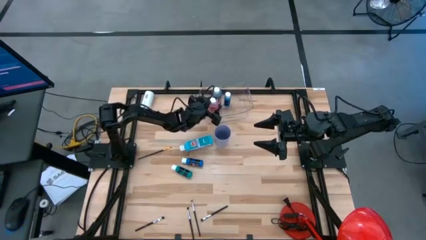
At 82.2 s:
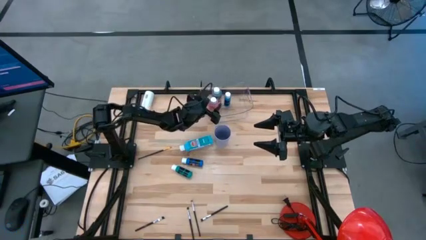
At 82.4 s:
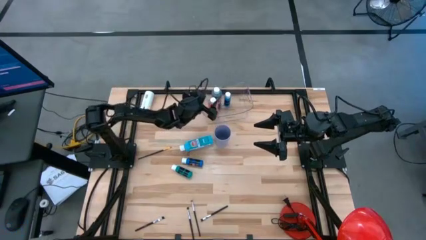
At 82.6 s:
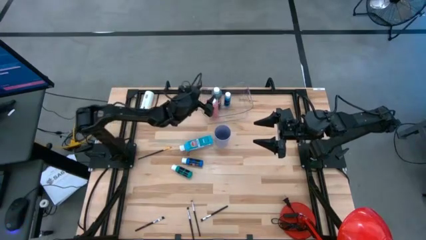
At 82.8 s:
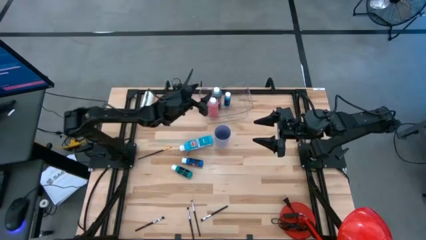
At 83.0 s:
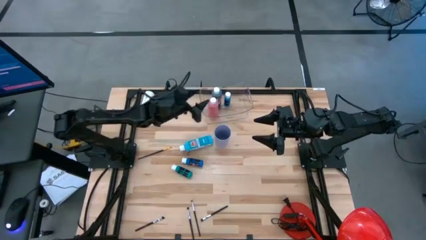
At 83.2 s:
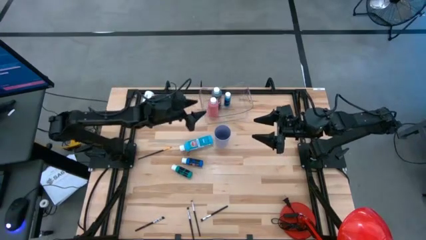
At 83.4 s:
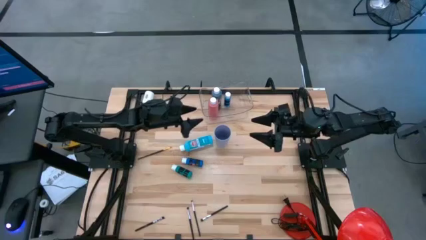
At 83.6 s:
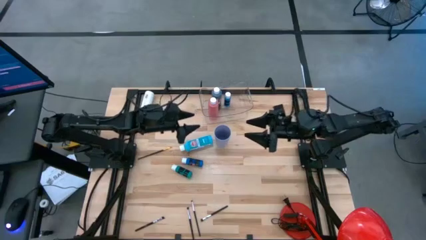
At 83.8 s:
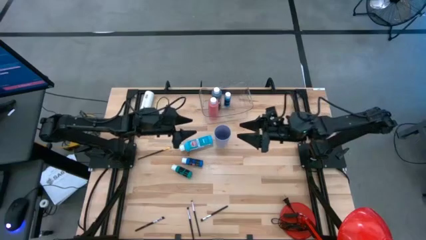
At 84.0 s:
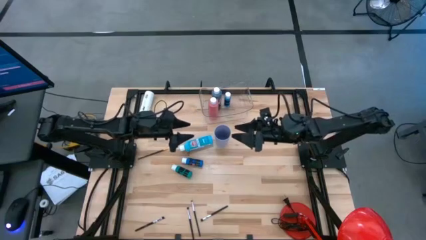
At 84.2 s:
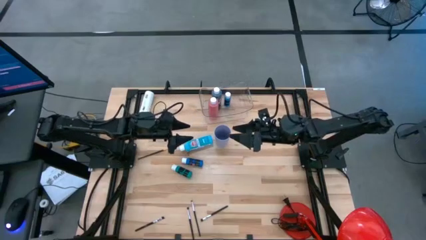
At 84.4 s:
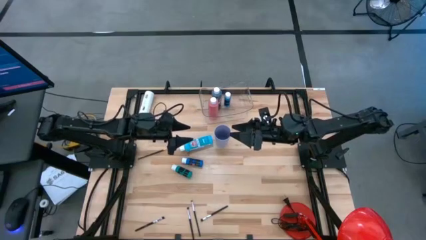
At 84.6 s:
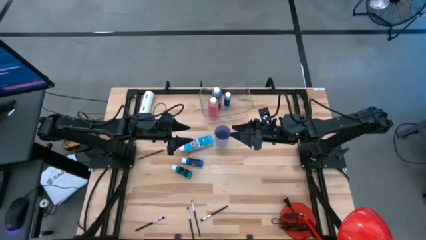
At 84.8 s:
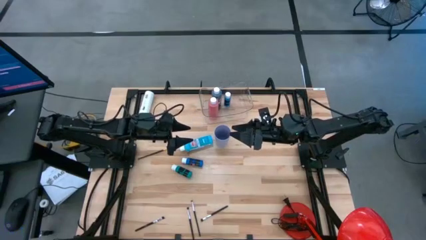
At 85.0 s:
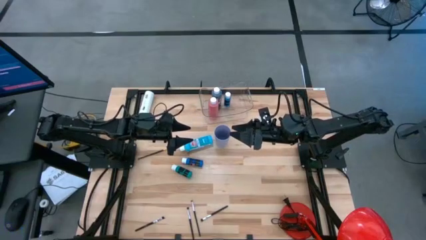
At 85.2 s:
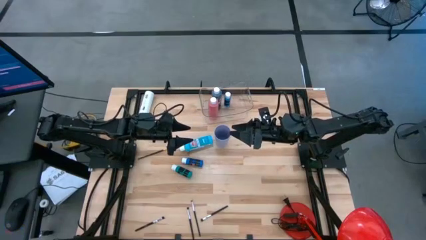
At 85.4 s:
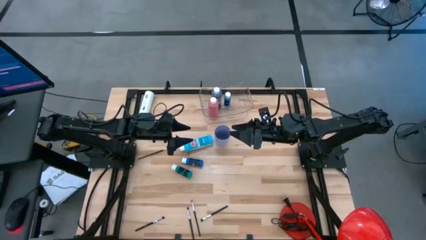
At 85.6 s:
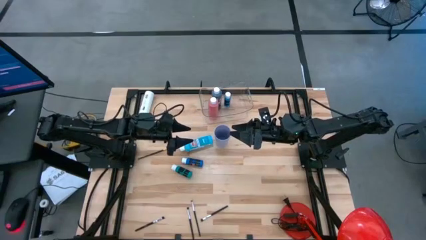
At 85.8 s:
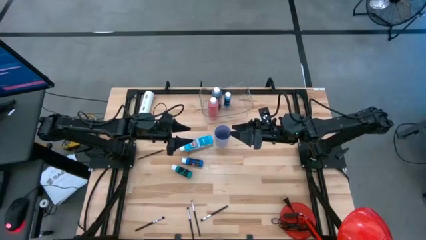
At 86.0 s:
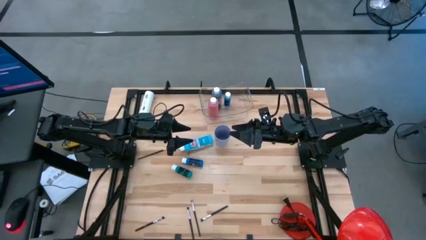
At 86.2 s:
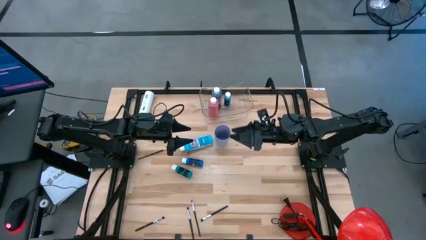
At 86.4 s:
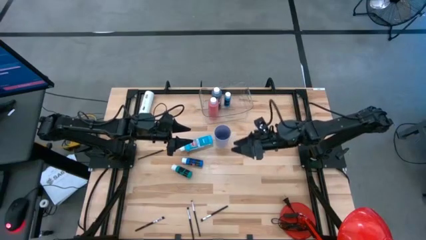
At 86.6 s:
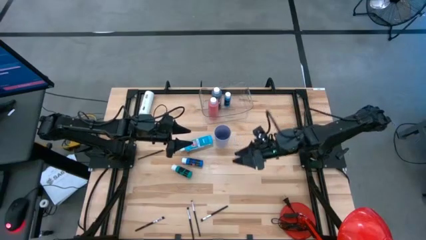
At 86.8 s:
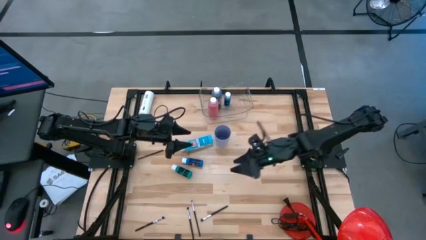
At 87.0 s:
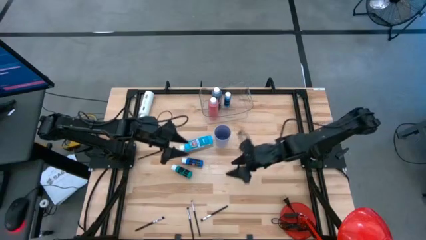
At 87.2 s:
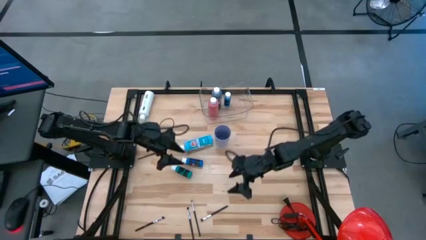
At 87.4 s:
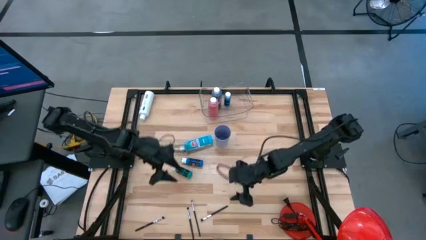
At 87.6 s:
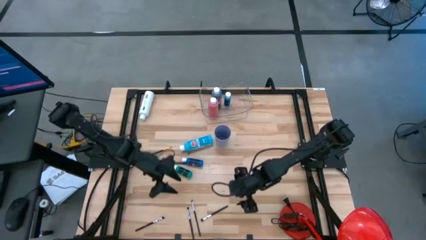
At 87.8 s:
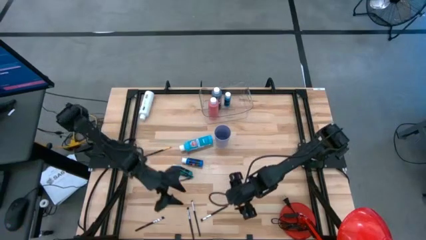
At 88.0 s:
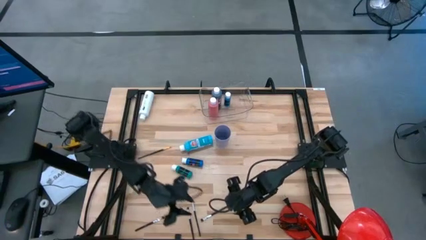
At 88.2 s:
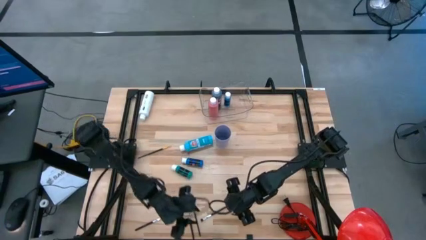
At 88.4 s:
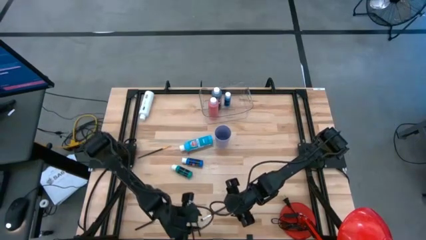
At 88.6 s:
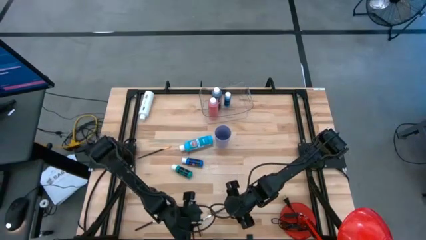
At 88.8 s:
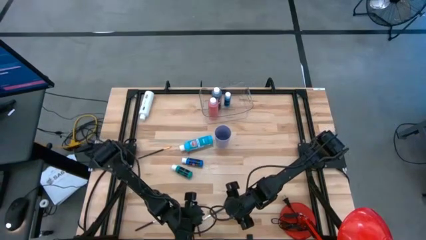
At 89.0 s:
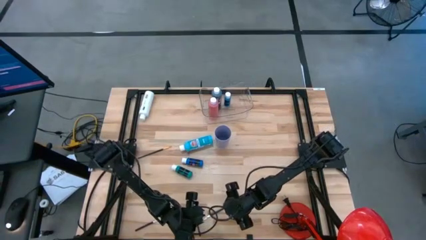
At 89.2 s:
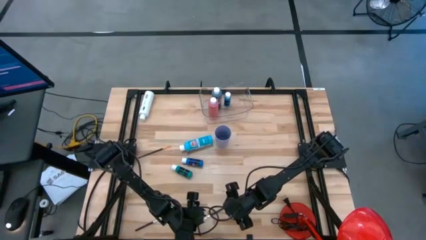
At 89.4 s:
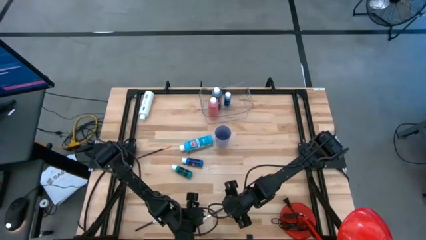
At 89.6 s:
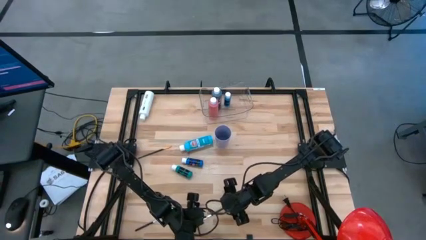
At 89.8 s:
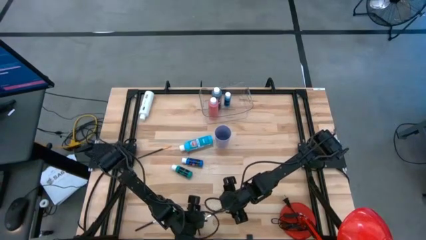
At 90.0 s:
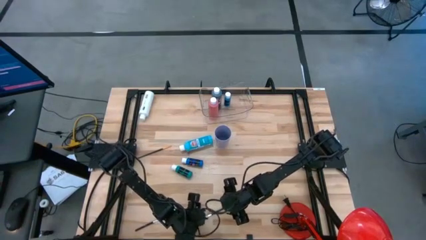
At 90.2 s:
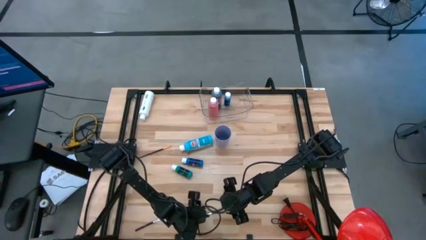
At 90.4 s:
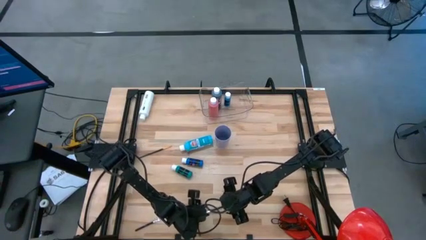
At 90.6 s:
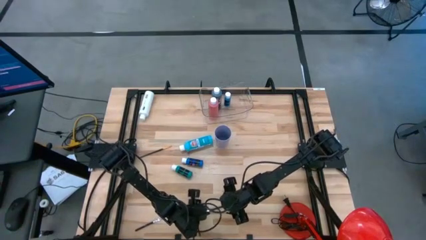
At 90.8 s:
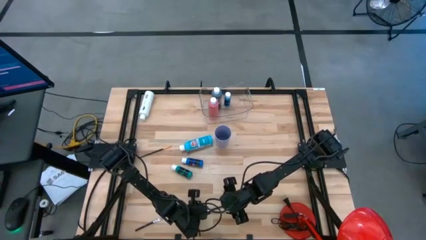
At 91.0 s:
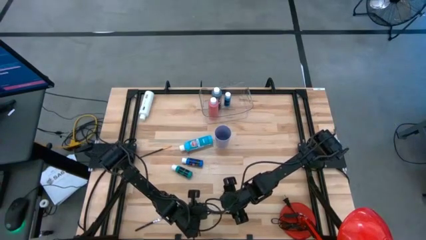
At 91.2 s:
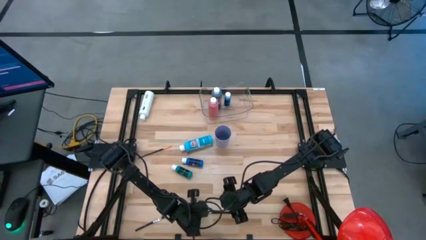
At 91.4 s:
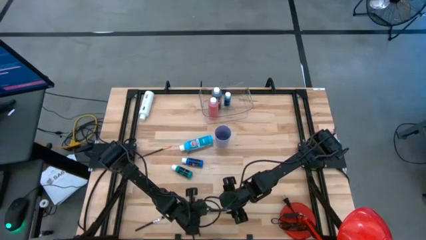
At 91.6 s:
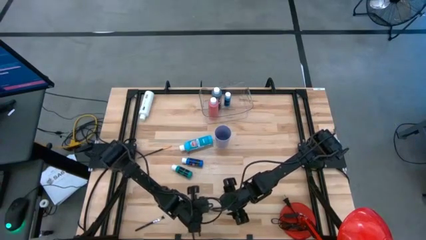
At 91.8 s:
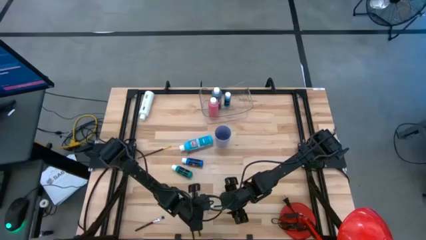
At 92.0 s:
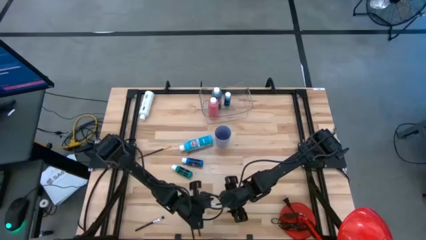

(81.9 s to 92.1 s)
Task: Pick & Place Paint Supplies
Put the black paint brush into the violet cup

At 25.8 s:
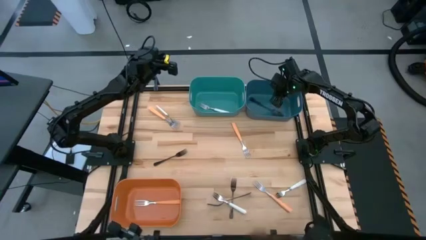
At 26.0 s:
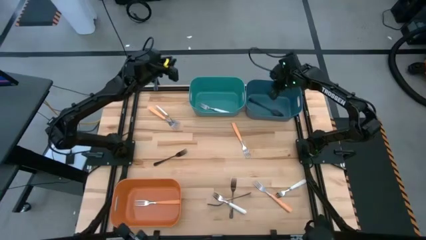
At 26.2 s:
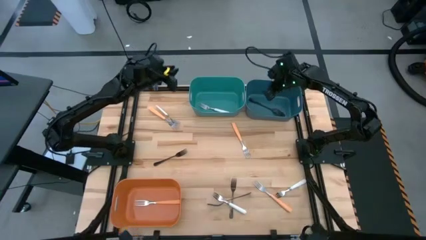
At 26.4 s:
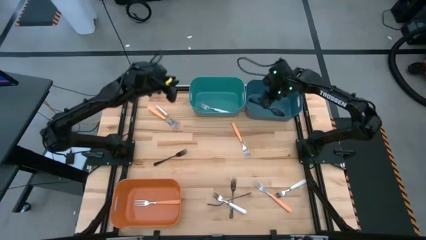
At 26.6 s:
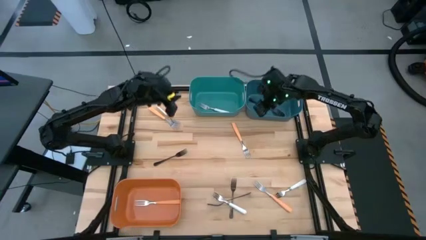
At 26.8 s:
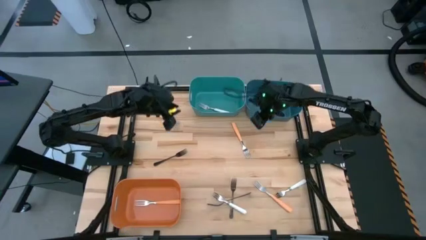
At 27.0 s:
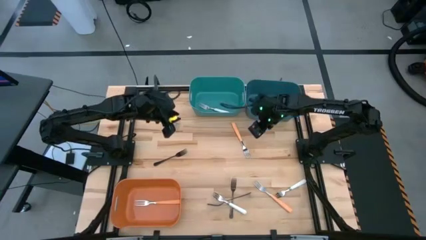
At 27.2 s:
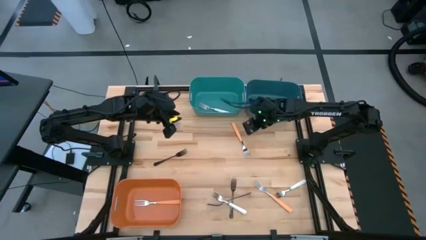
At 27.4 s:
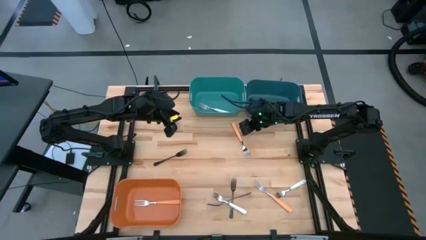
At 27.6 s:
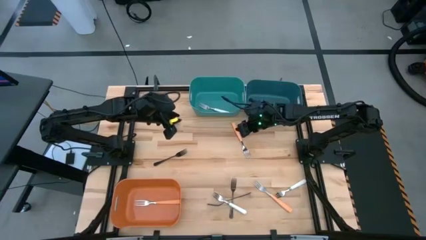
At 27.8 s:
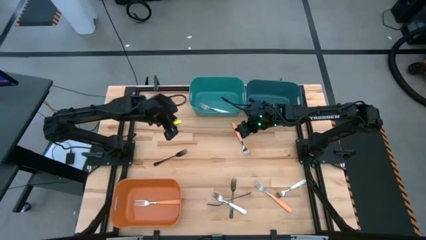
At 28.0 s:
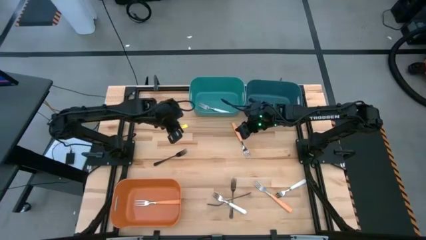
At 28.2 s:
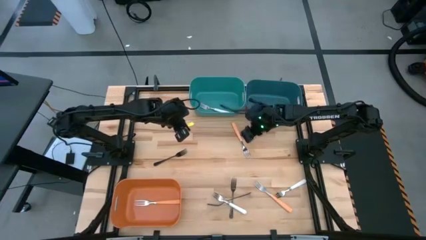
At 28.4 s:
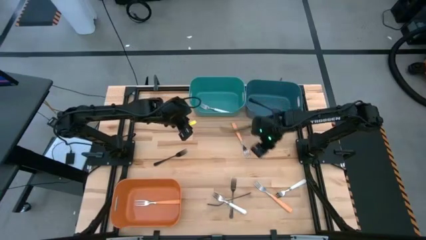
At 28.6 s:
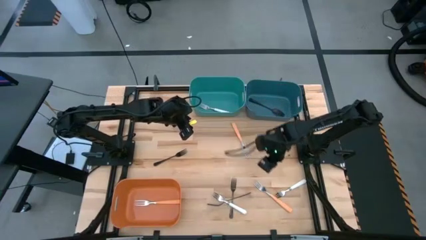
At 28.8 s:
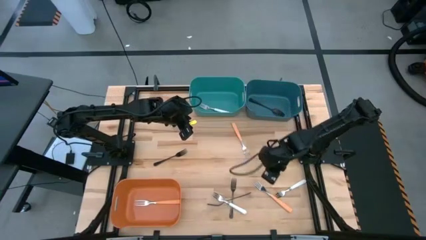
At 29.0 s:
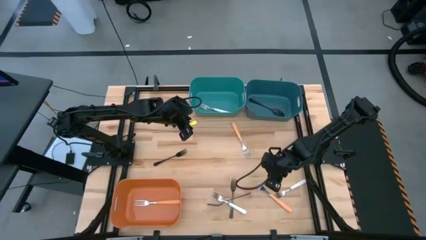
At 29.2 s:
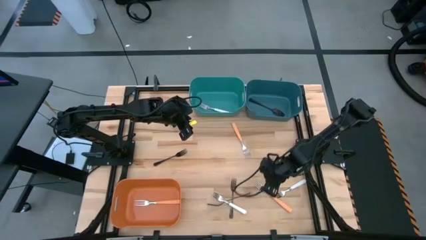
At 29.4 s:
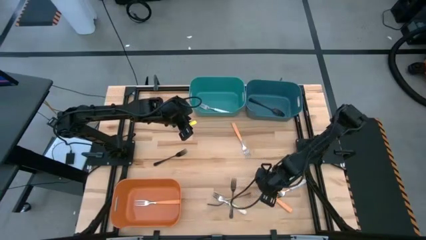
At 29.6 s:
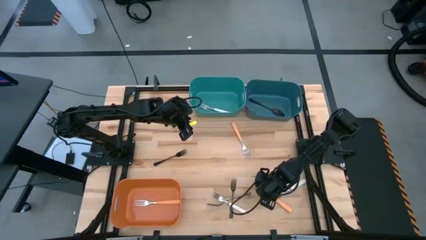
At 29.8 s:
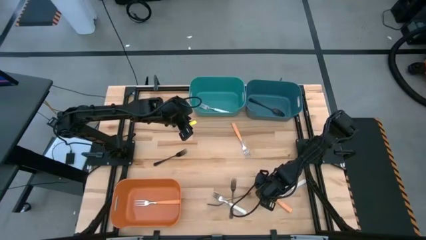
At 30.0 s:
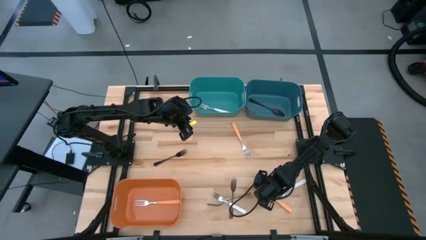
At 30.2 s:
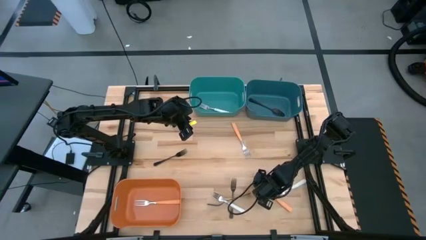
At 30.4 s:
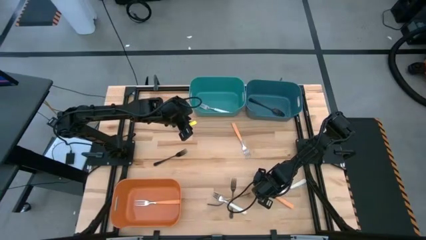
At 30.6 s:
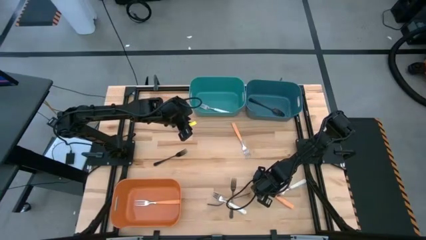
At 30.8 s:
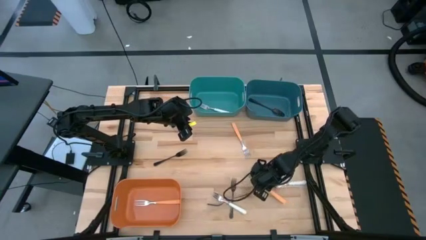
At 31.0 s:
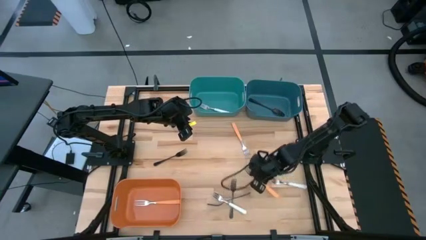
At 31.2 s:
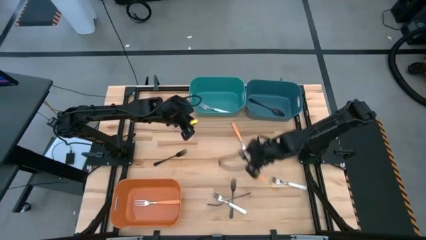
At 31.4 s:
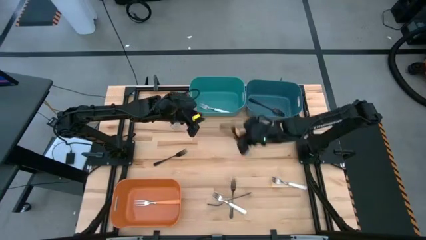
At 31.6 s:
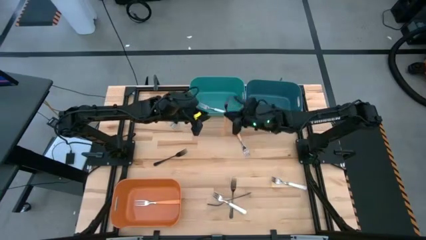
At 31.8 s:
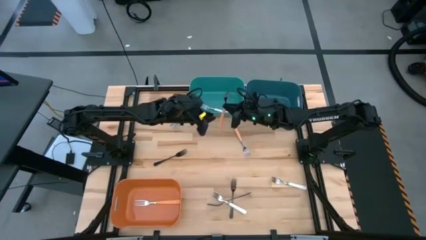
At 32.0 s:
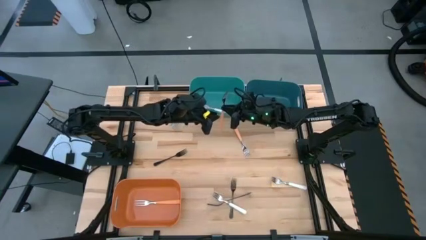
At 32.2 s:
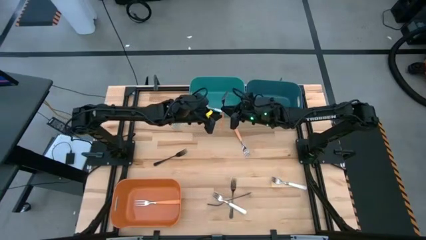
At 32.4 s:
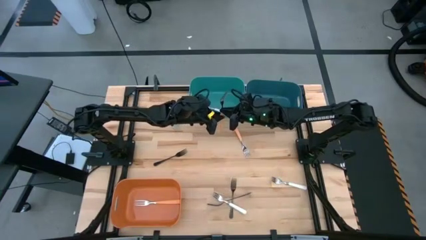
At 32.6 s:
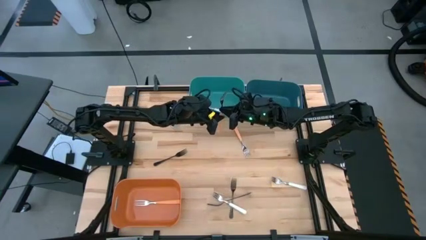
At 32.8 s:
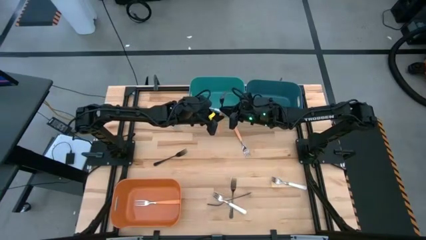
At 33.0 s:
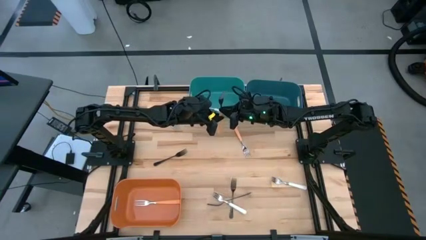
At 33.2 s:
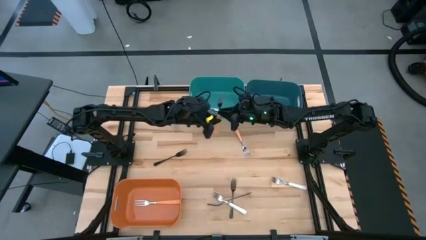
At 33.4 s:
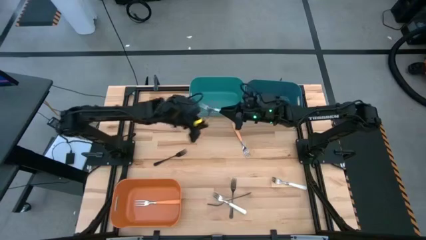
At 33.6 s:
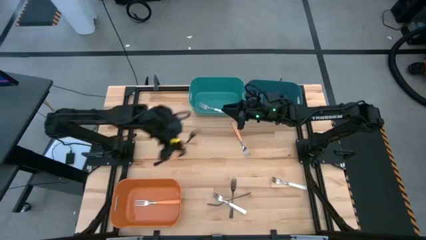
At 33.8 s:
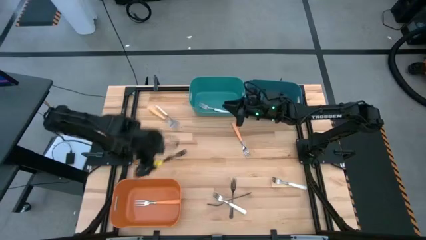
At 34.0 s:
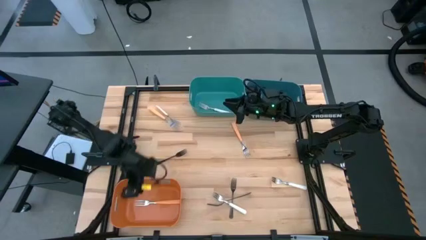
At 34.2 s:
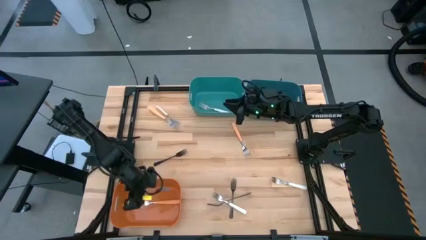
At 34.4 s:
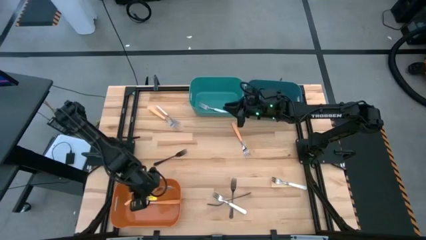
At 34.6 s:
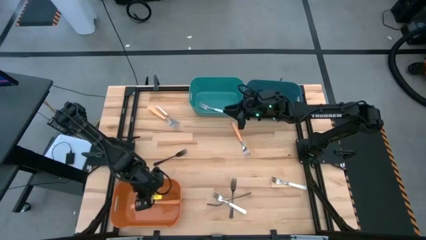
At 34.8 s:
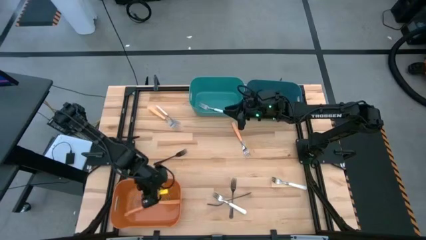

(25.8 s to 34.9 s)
Task: Sort silverware by color (type)
Put the top right orange fork into the orange bin
